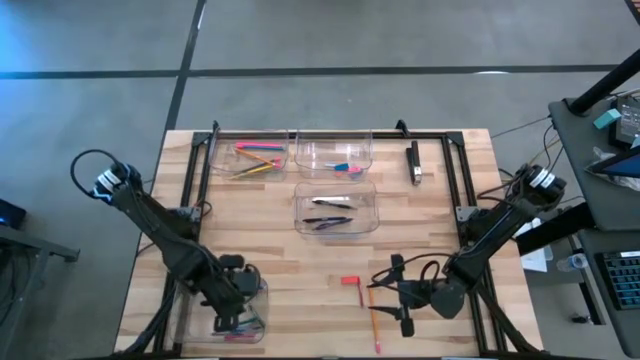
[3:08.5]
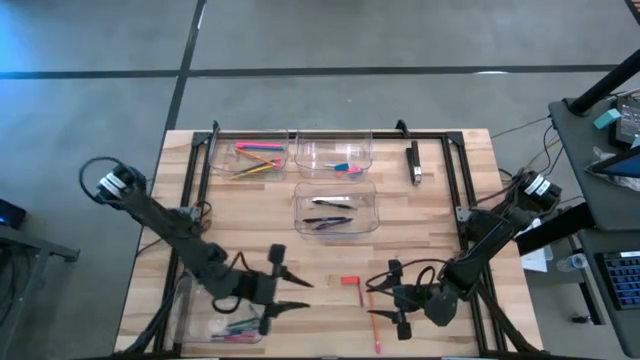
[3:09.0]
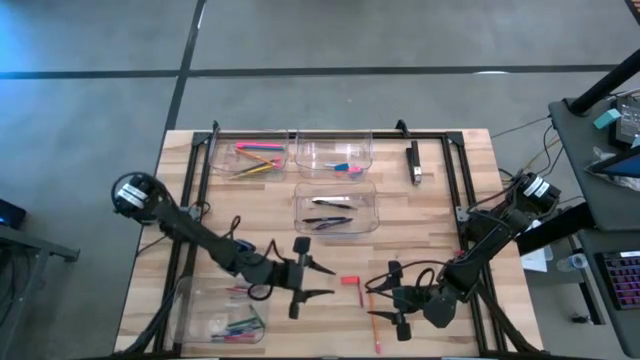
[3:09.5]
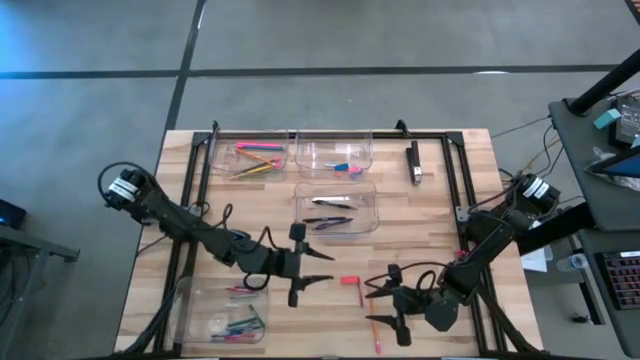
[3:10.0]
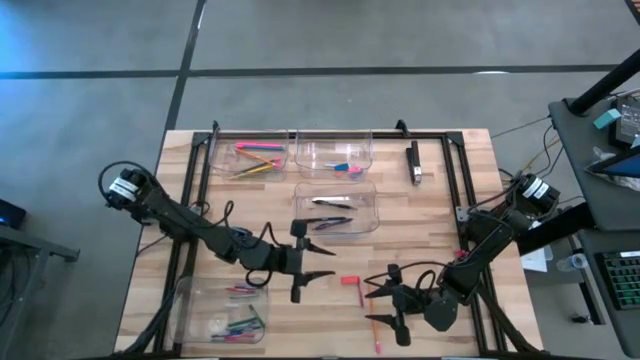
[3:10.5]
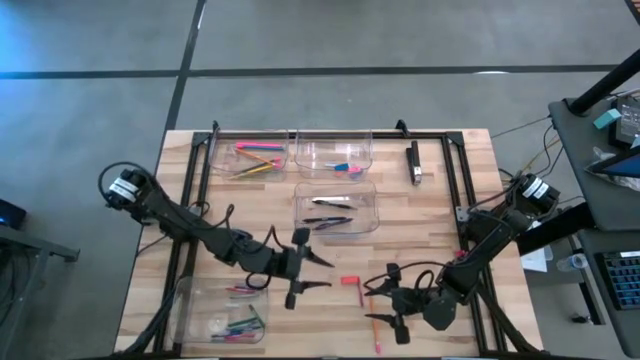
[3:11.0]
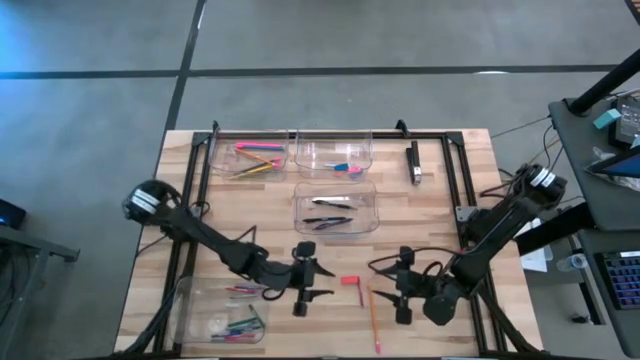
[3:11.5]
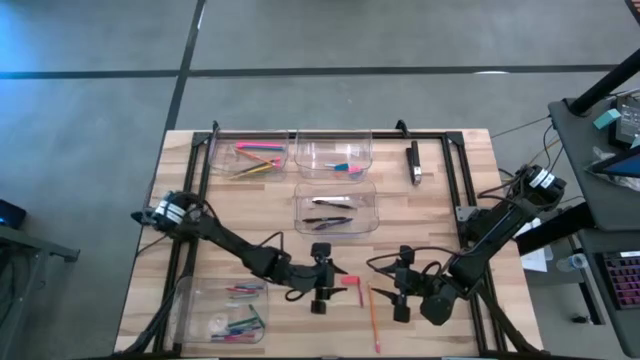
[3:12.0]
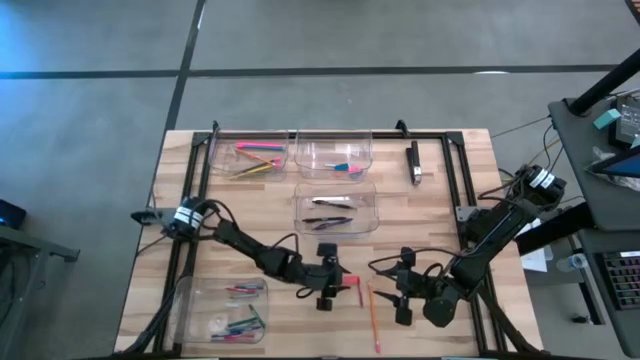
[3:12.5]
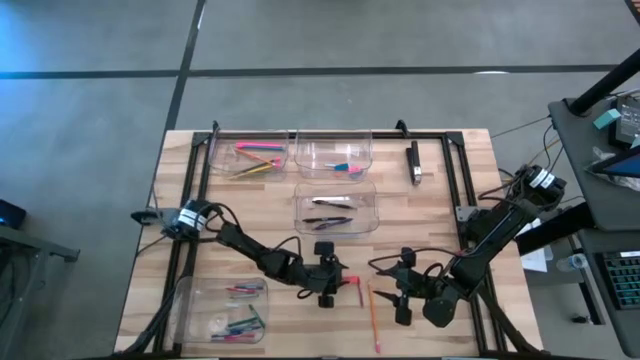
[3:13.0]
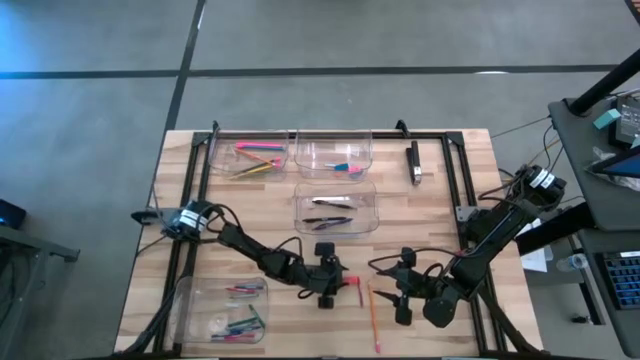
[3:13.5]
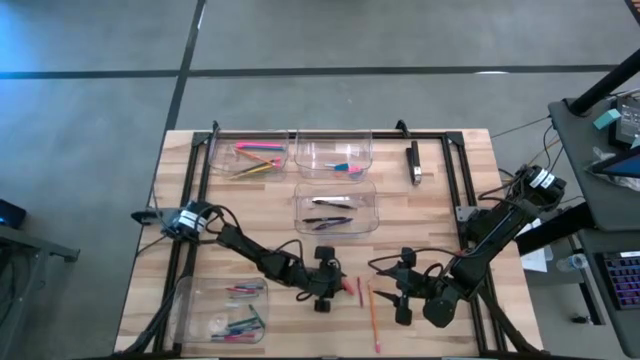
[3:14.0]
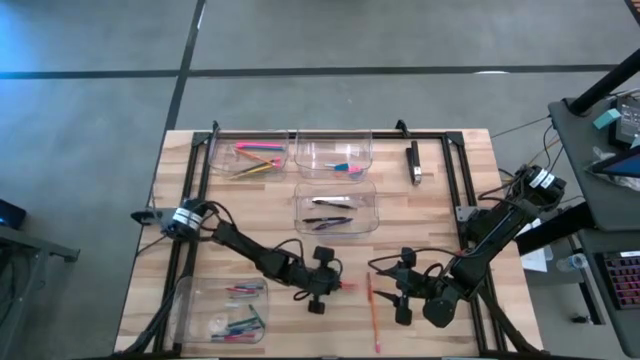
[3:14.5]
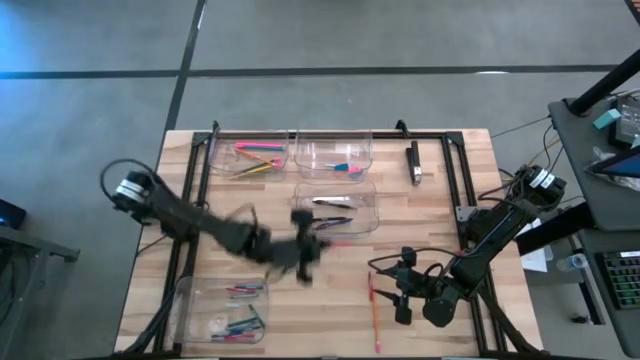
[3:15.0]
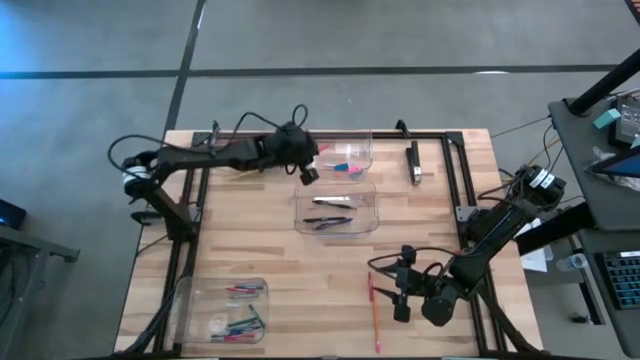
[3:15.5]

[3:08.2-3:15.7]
Task: Sort crayons/erasers/pens/pencils in bins
Put the orange eraser into the top right transparent bin

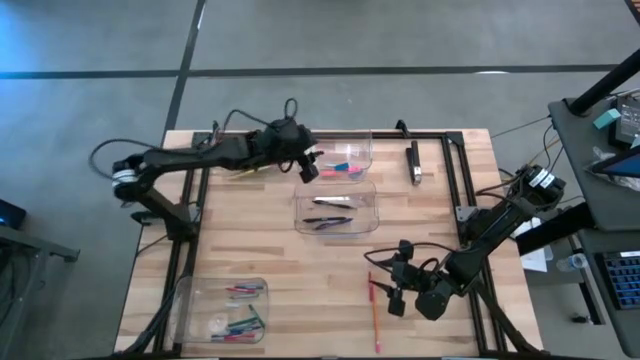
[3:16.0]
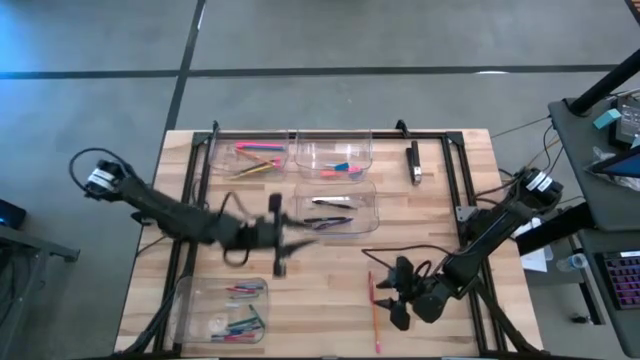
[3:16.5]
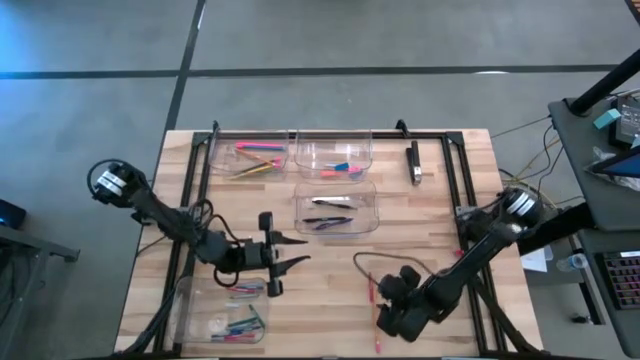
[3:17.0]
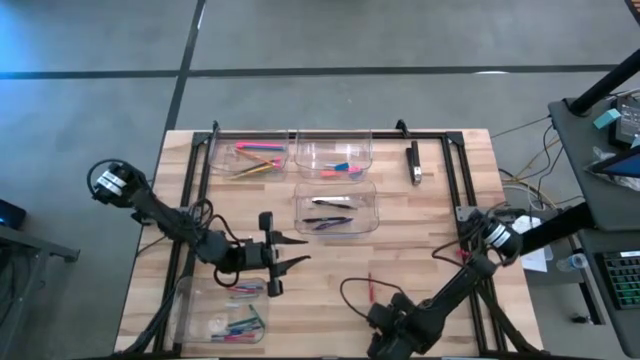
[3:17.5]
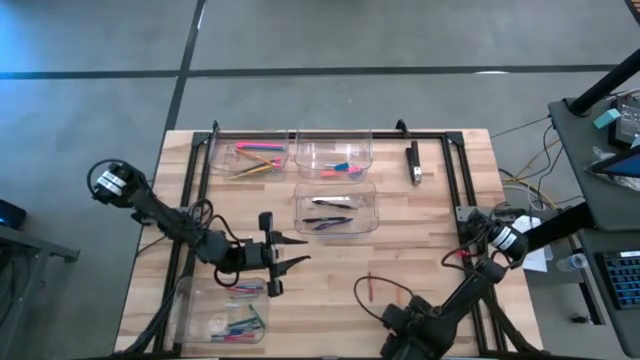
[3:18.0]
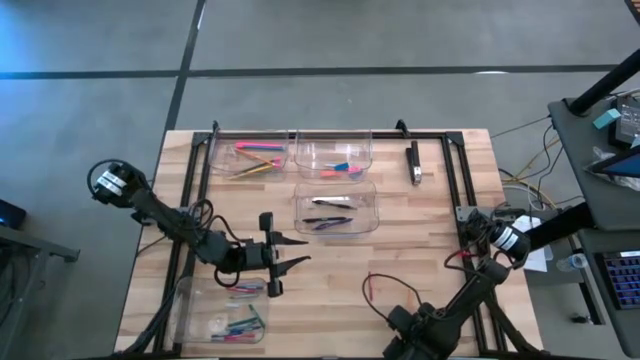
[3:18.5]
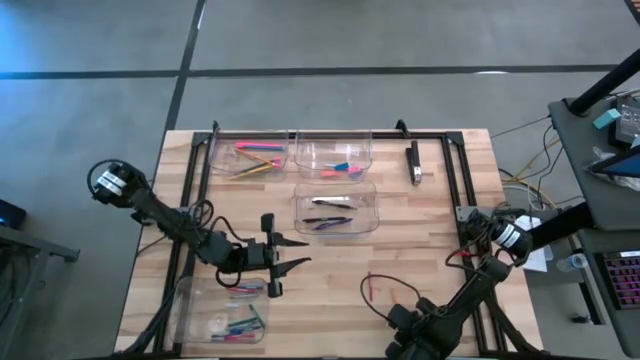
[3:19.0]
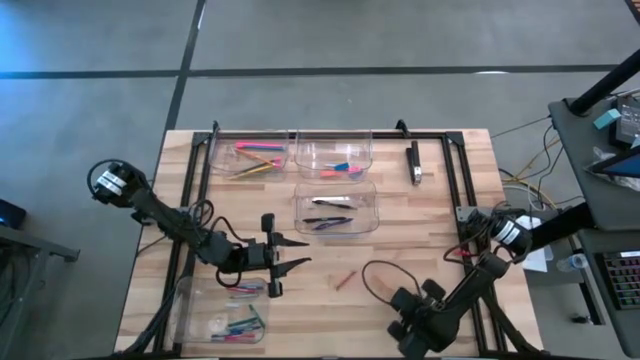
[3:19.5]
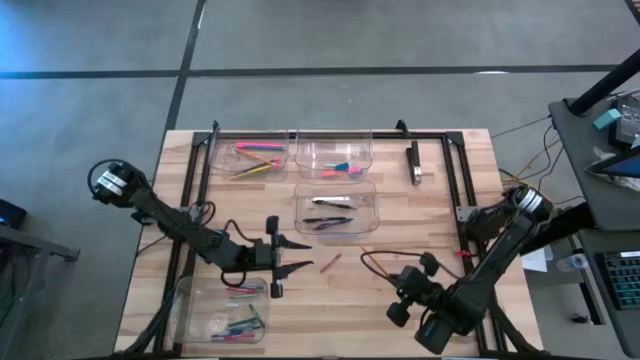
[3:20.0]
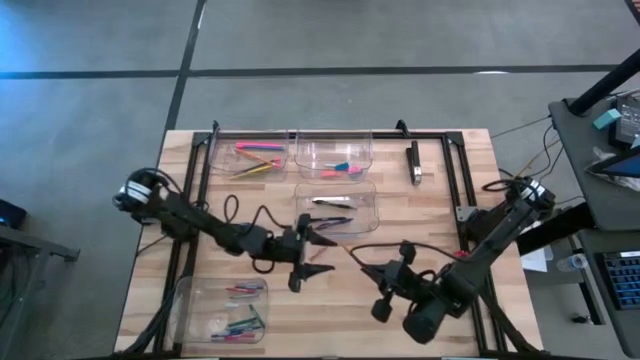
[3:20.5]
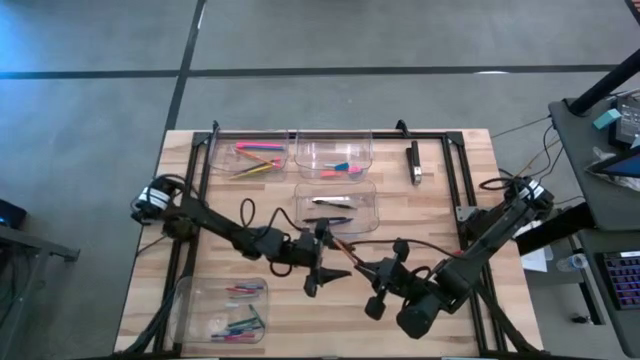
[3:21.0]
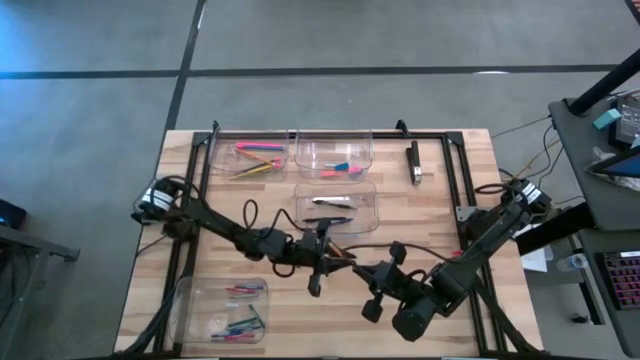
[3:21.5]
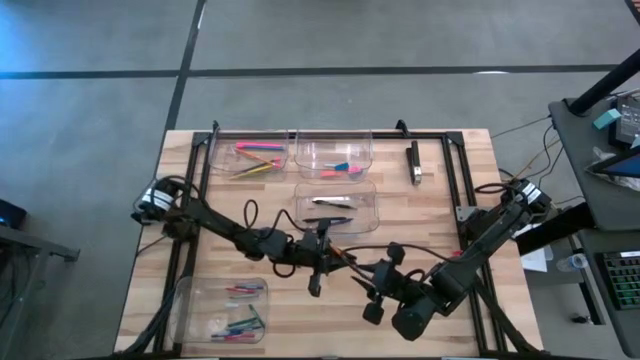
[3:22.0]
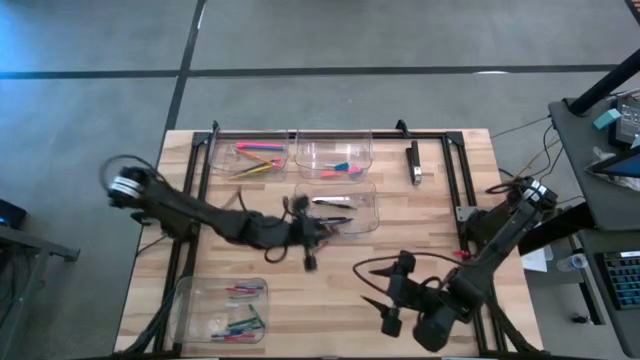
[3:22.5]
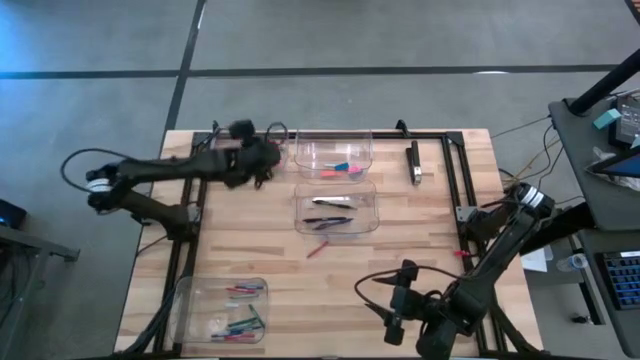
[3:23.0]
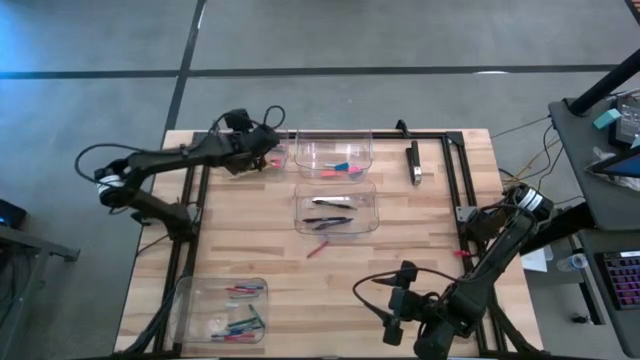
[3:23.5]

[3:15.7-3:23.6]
Put the orange pencil into the top left transparent bin

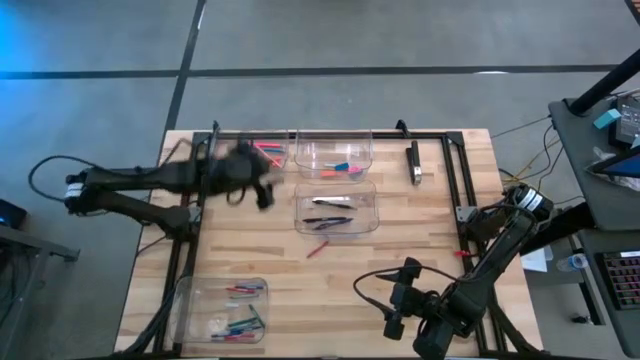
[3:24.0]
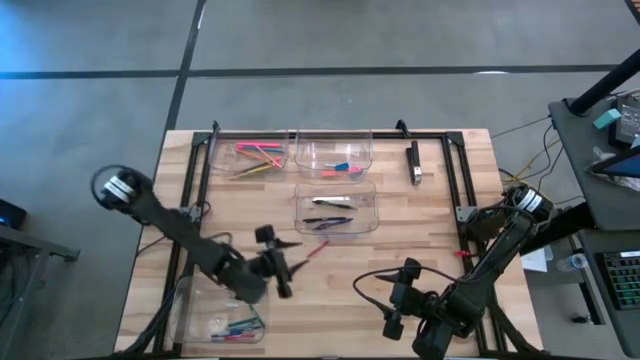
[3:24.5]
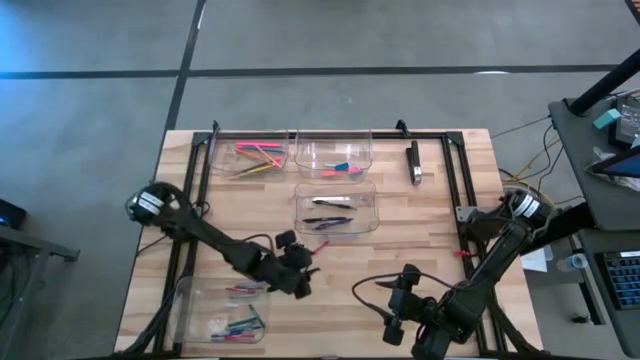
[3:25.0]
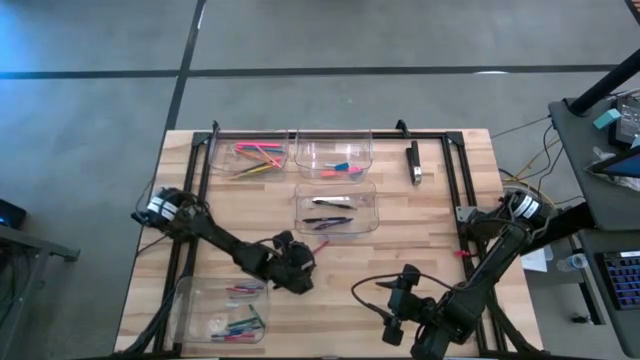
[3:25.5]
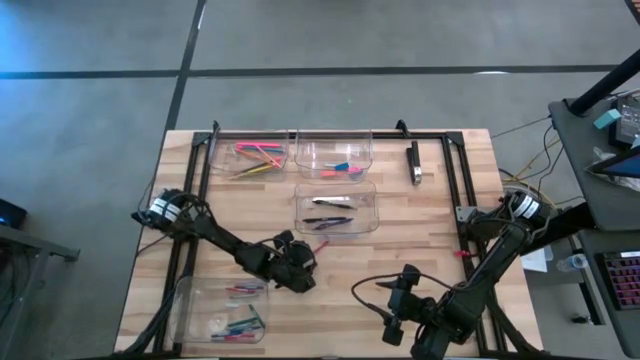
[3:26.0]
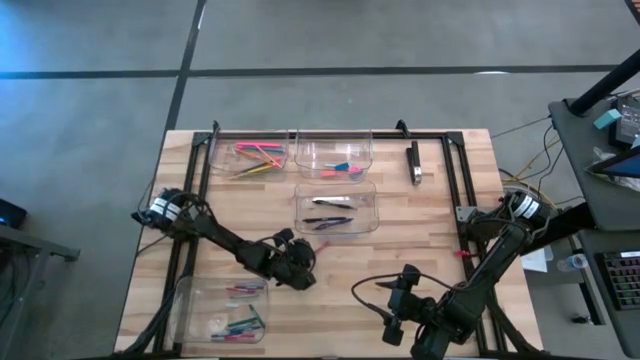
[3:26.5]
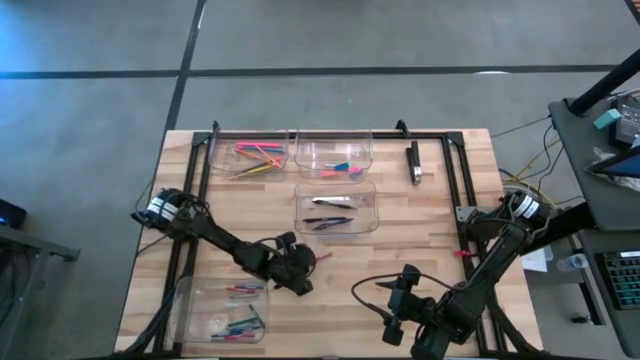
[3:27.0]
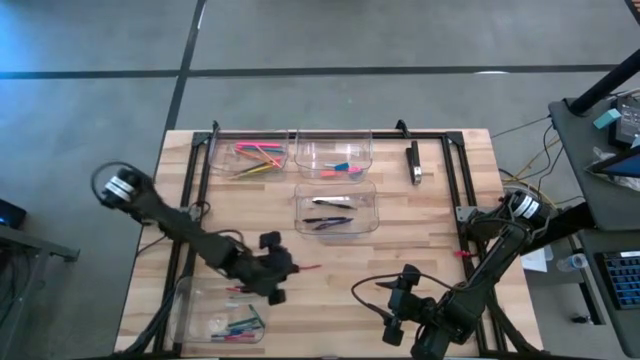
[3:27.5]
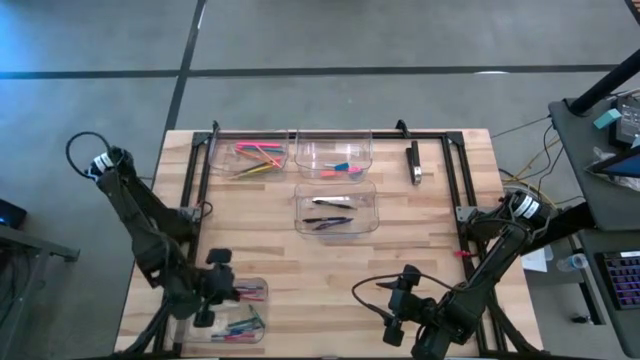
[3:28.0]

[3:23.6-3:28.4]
Put the red crayon into the bottom transparent bin

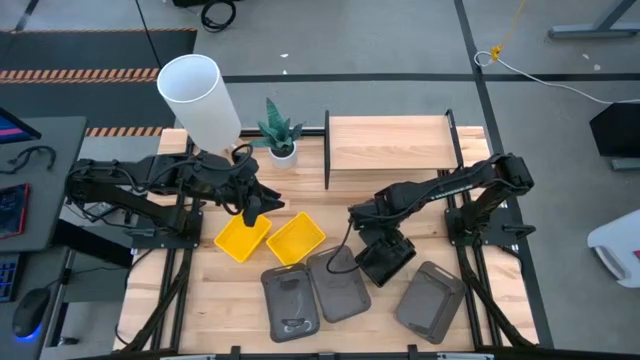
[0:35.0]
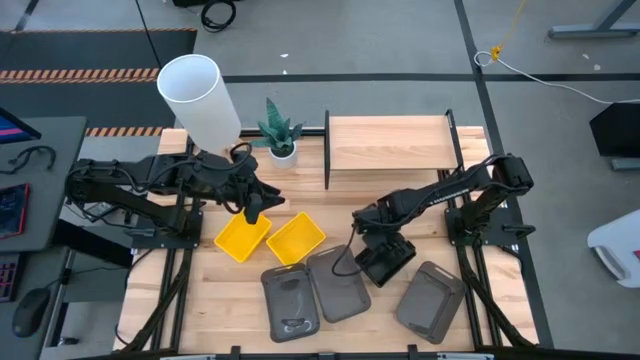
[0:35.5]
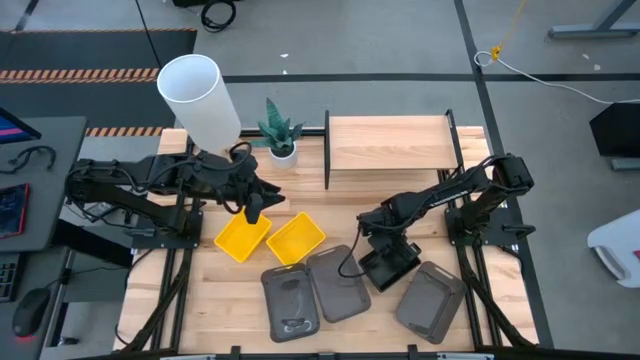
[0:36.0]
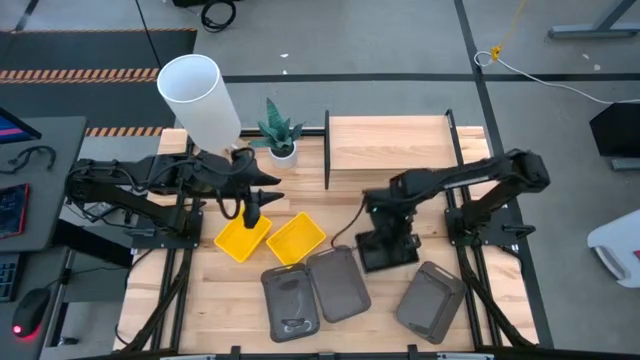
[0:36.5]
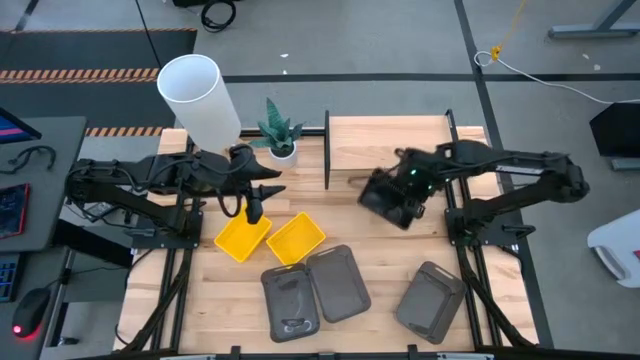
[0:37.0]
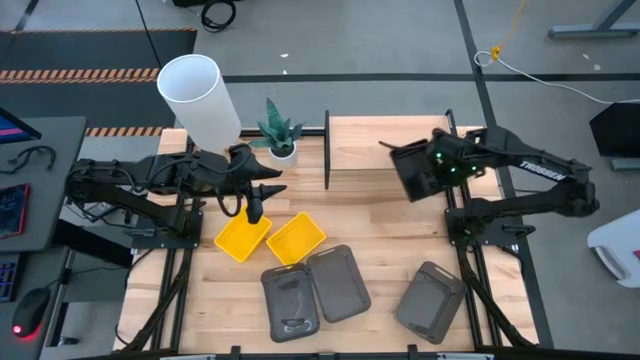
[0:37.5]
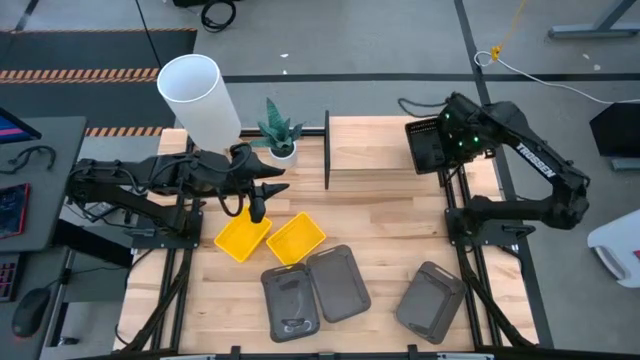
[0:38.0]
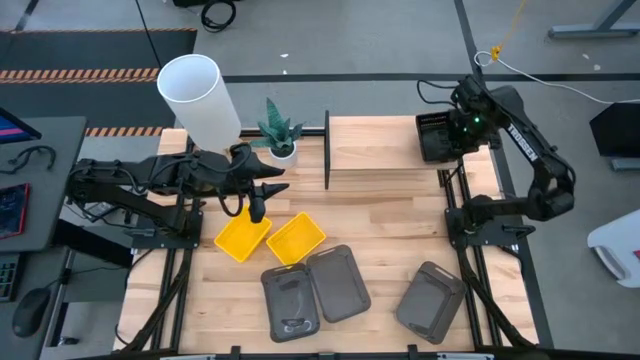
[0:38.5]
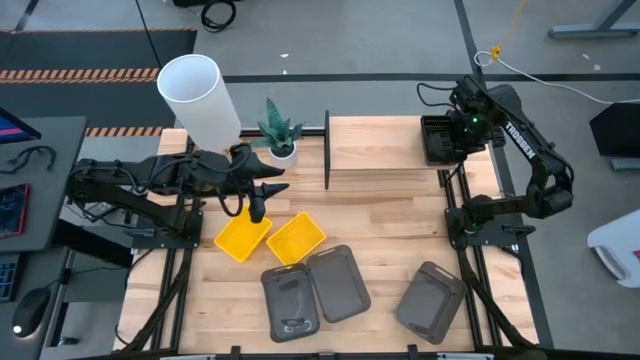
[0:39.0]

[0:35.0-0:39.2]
Task: Stack baskets on shelf by color
Put the stacked black bins on the shelf
